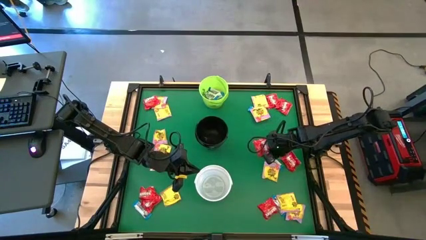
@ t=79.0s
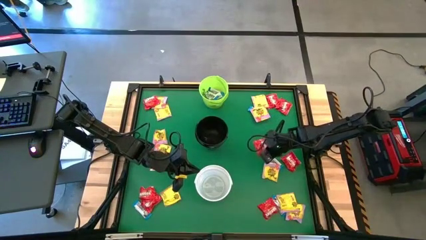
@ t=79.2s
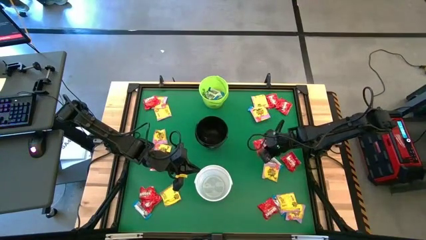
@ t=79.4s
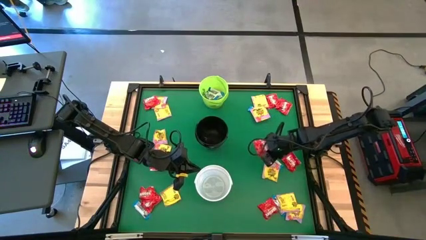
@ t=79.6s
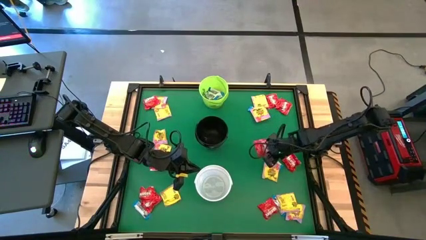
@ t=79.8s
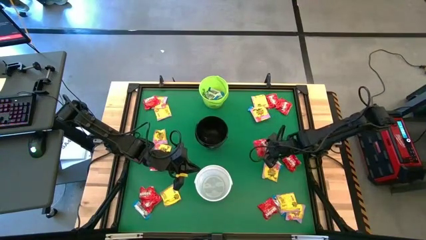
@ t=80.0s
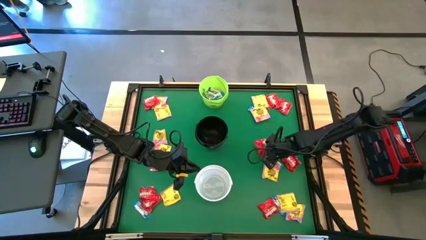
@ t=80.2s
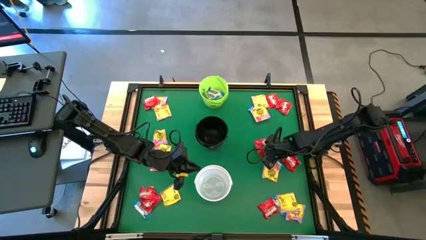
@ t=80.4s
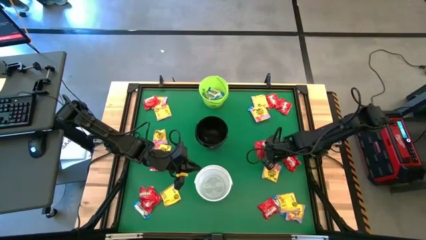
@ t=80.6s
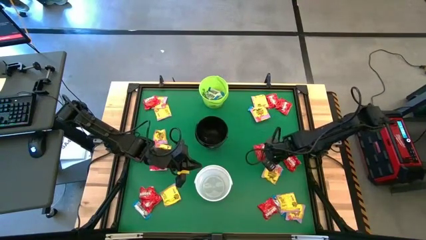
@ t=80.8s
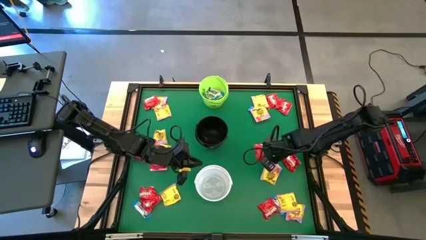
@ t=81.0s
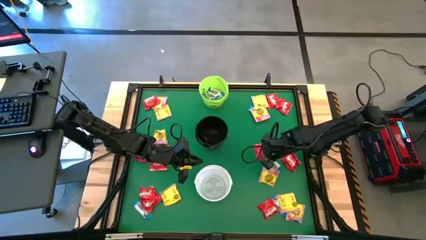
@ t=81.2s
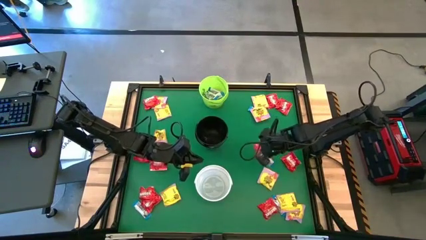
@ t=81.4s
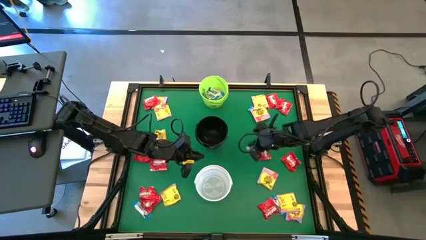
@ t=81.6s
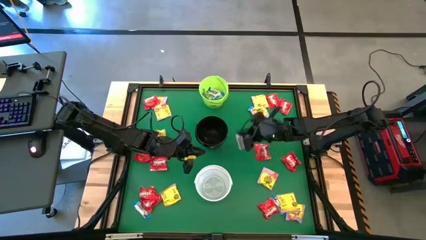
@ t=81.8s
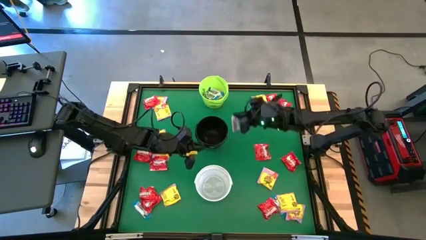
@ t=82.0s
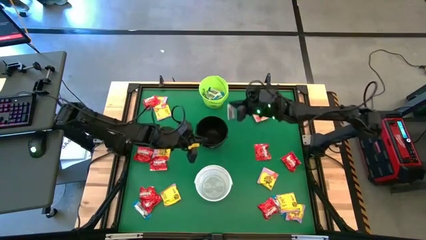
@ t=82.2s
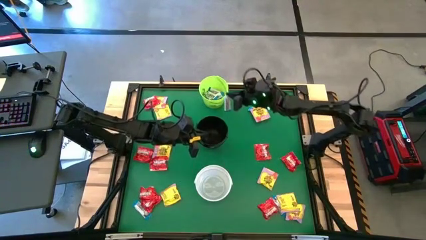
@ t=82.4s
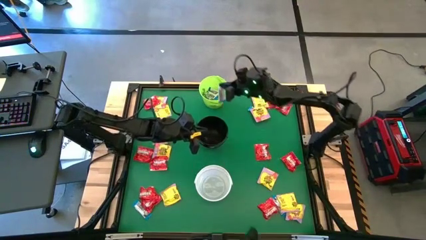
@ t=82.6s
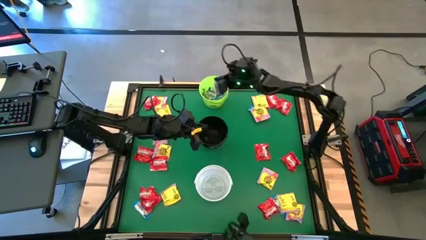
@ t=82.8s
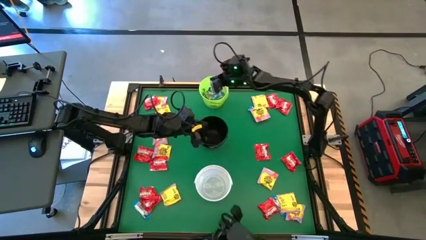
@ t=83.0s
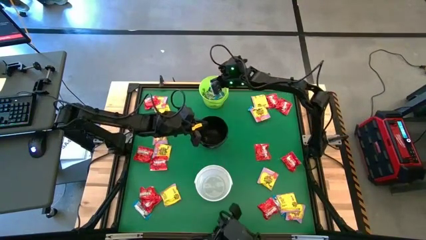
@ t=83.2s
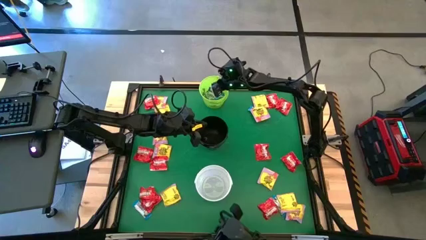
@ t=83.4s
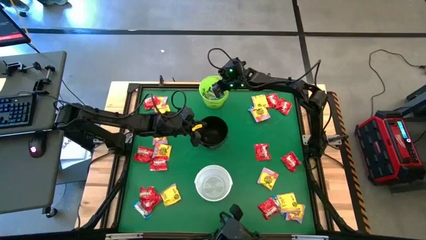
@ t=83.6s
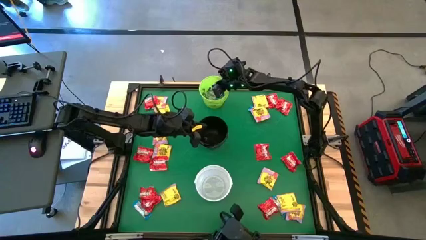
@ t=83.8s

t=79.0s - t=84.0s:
Task: Sort candy by brand, put in halloween buckets
Put the white chocolate into the green bucket

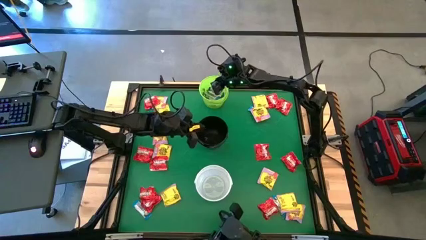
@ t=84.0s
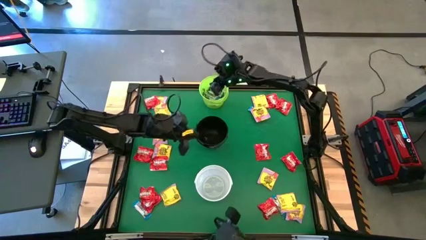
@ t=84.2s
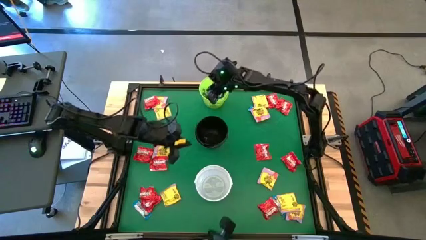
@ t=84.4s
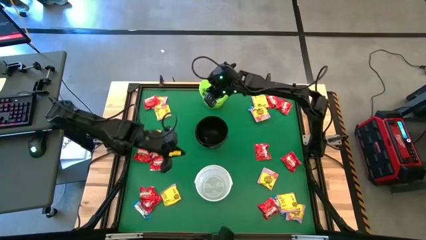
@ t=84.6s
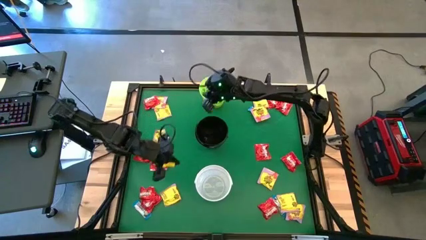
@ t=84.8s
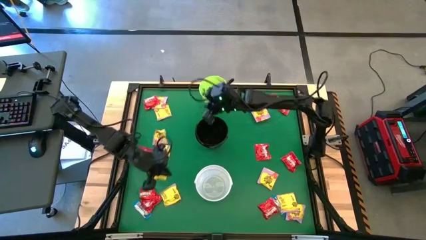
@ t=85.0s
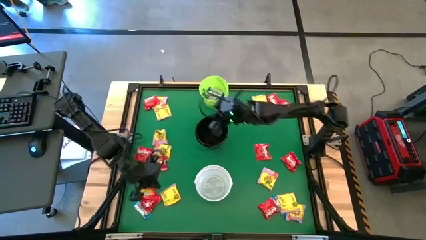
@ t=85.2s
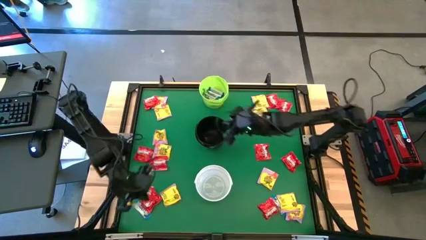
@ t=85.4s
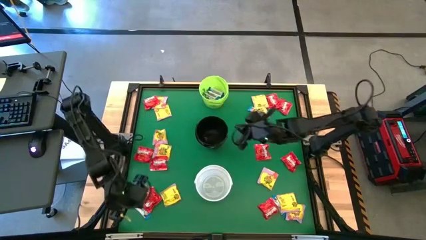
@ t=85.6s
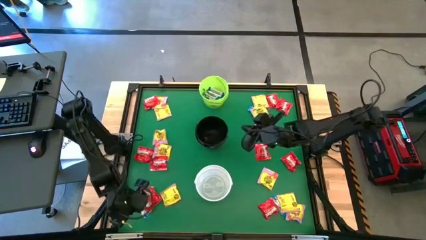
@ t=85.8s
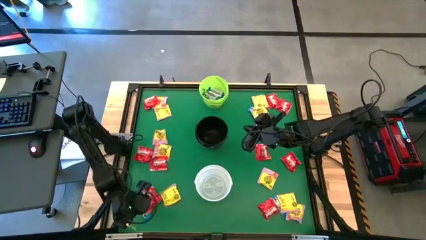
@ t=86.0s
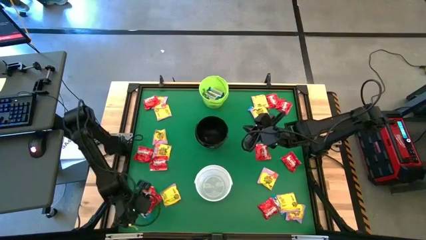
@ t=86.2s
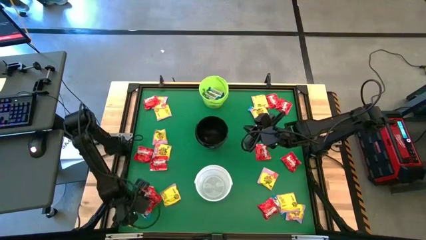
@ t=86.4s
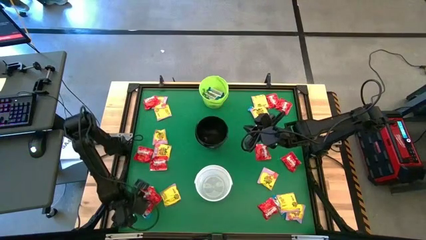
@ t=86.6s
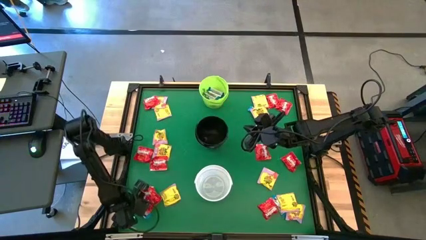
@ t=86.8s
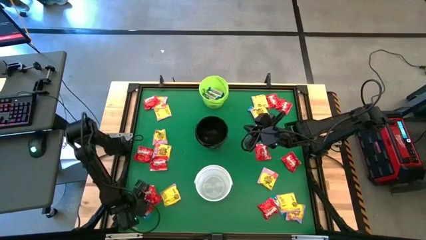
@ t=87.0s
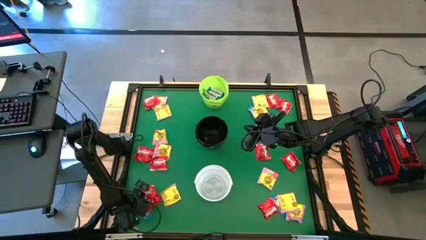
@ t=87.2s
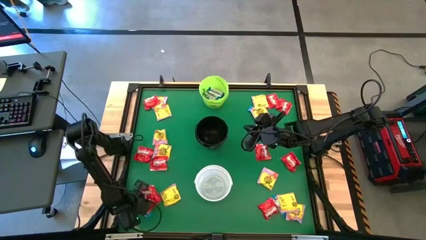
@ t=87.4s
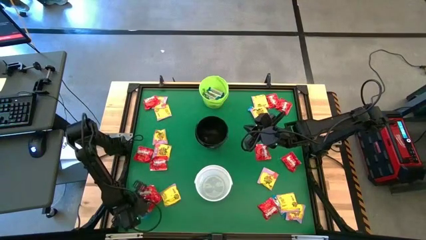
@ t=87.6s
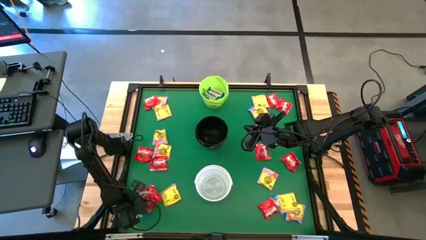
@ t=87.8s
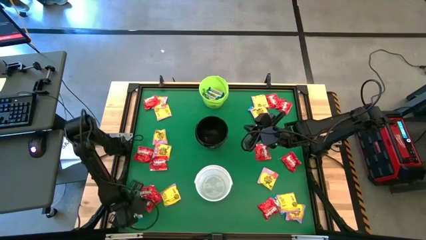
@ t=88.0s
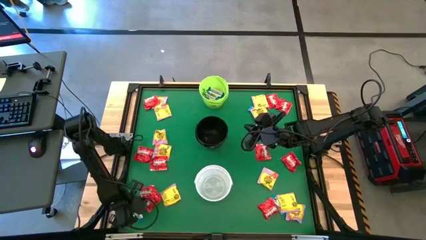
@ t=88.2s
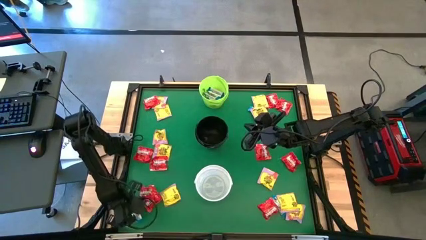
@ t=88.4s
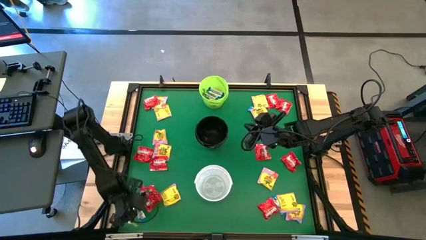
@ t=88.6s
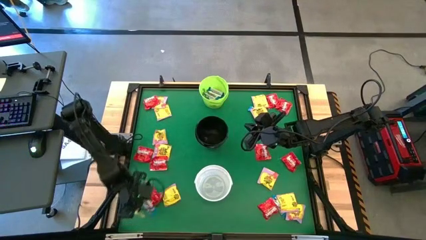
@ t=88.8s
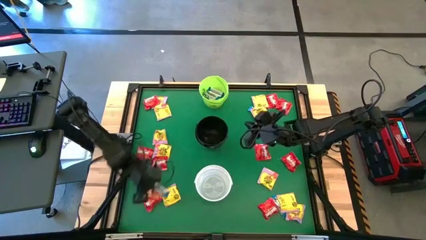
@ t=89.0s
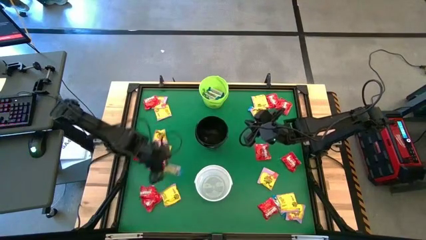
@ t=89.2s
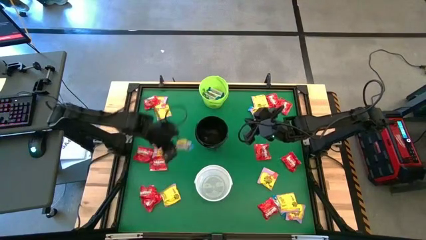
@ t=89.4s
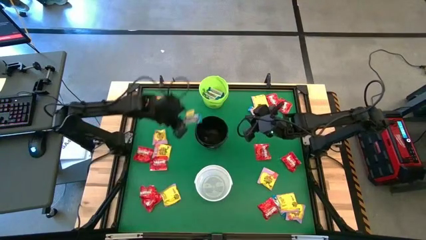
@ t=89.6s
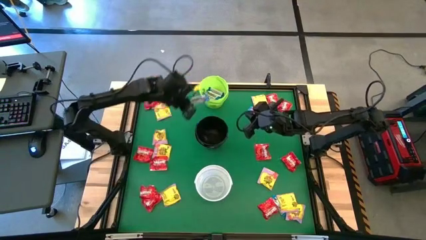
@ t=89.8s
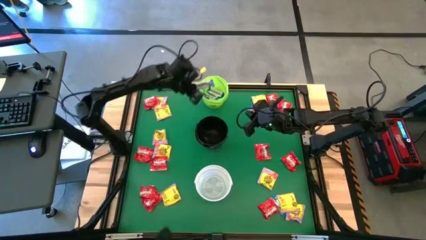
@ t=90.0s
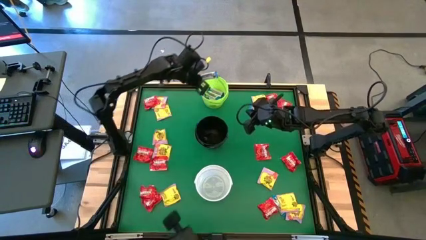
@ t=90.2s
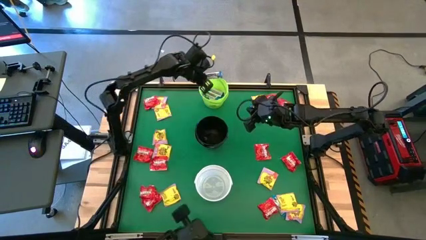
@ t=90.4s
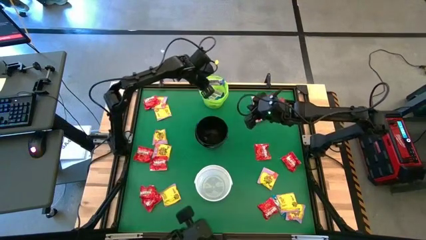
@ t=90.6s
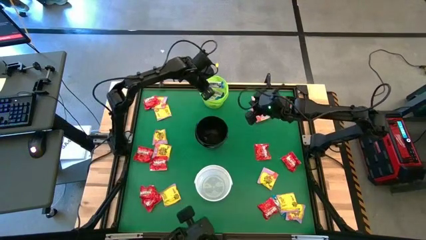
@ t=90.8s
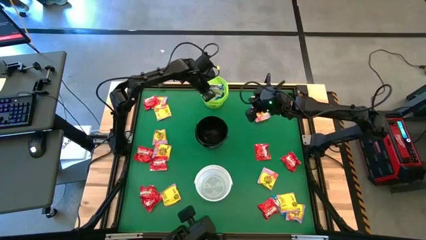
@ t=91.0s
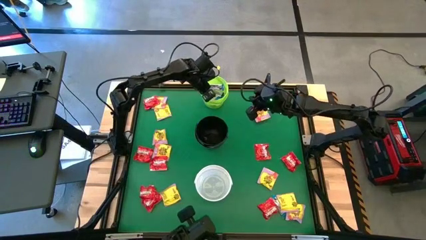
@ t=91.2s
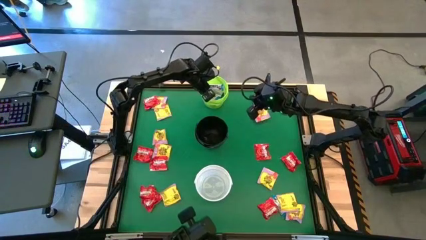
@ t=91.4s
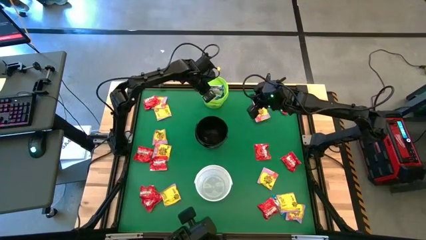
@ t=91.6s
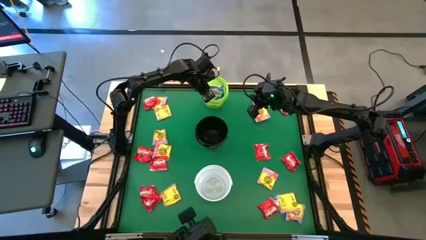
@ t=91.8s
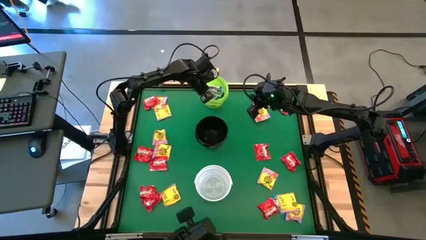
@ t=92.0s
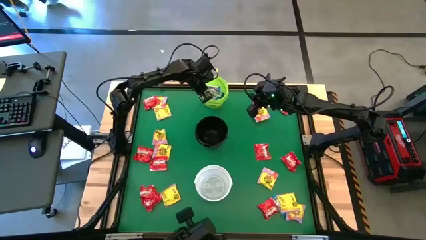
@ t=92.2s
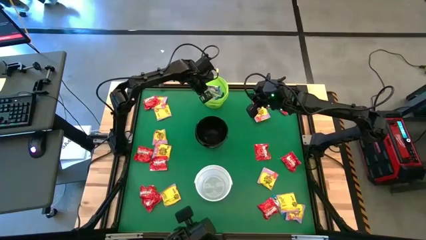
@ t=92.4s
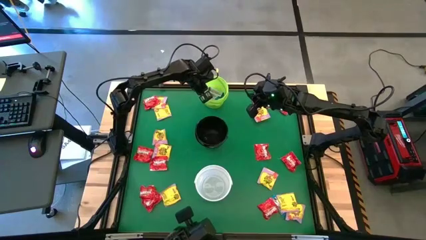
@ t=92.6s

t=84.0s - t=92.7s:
Put the white chocolate into the green bucket

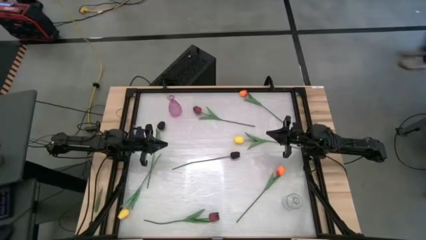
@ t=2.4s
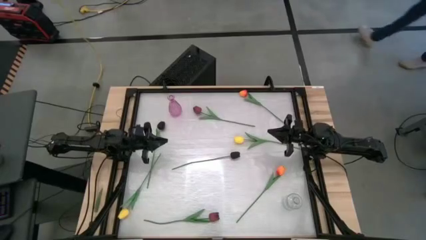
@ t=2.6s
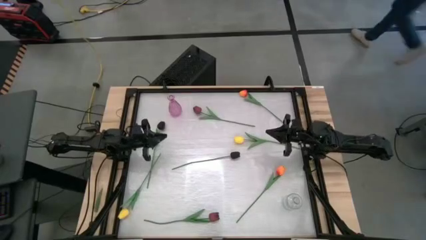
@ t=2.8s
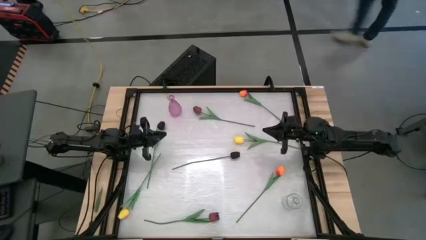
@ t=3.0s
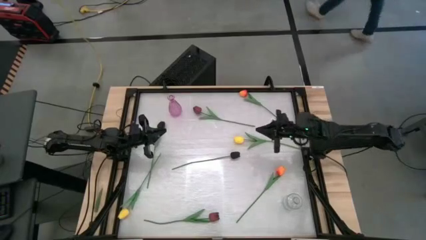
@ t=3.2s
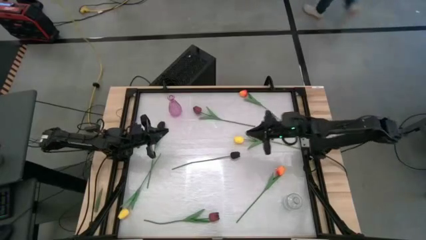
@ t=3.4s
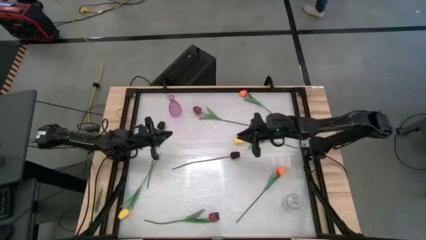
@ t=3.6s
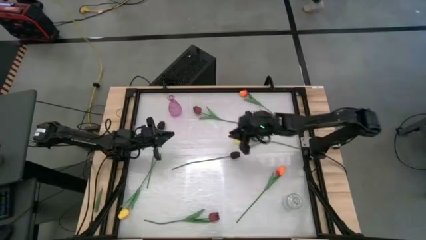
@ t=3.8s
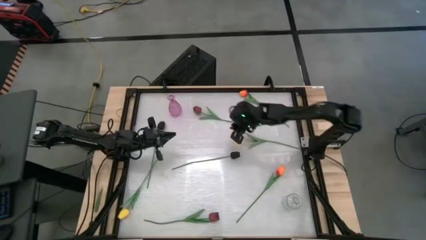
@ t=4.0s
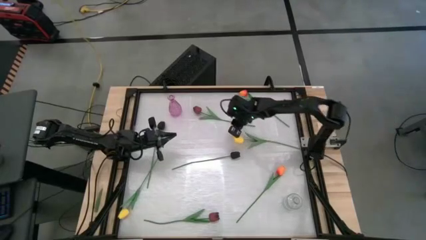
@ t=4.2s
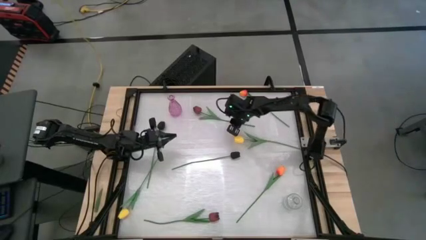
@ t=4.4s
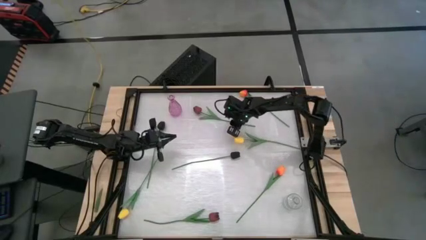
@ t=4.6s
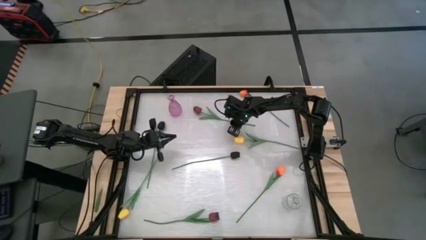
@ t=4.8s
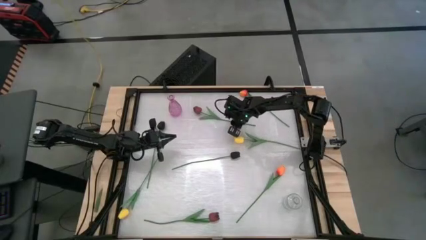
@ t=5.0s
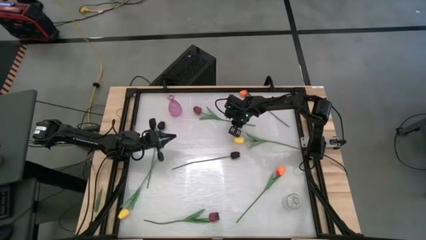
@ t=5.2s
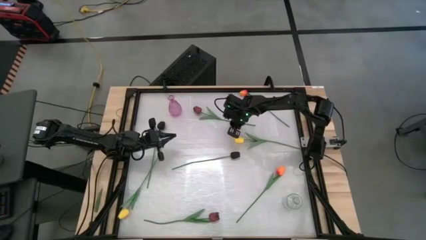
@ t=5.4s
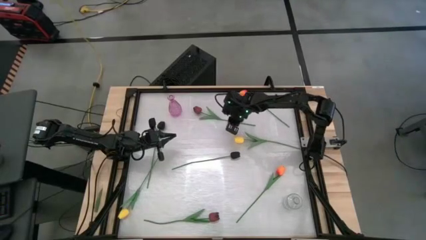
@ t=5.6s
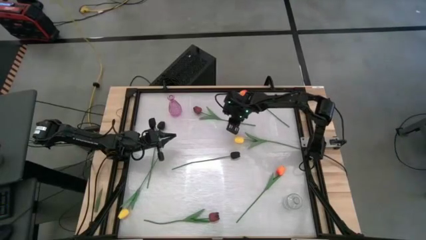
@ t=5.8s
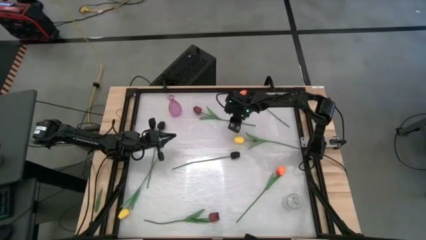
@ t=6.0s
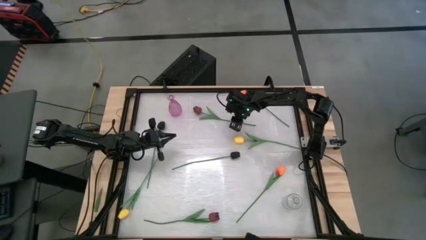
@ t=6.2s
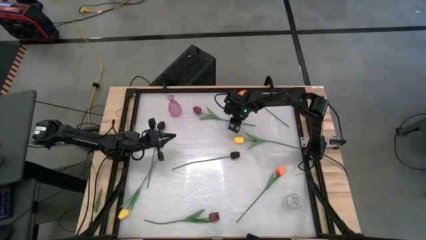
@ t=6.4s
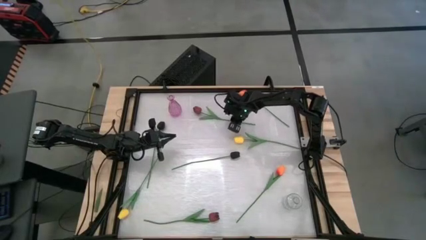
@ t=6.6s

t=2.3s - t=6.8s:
Task: Sort flowers into vase by color
Put the top red flower into the purple vase
